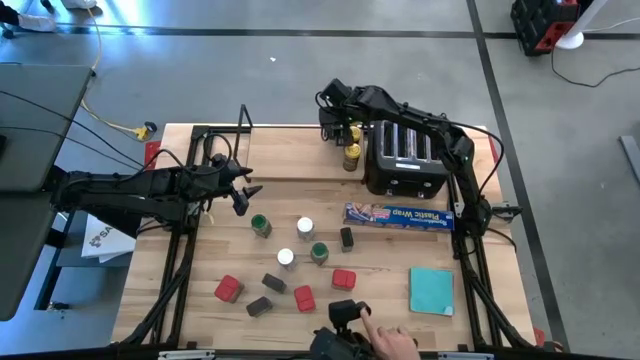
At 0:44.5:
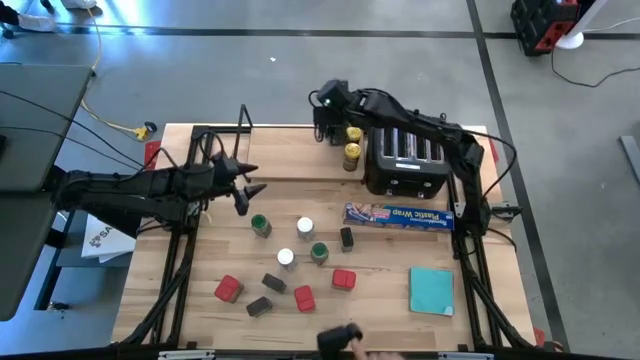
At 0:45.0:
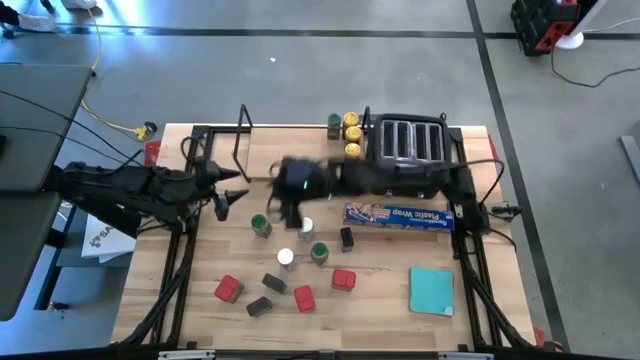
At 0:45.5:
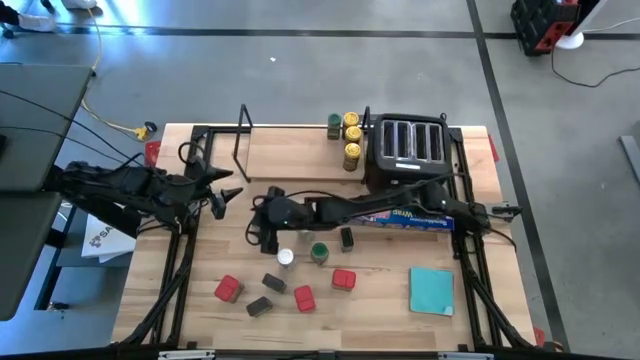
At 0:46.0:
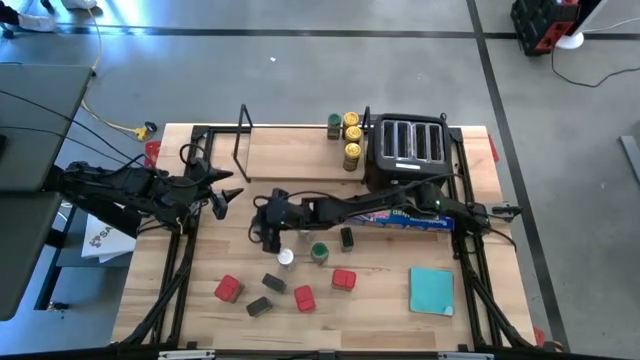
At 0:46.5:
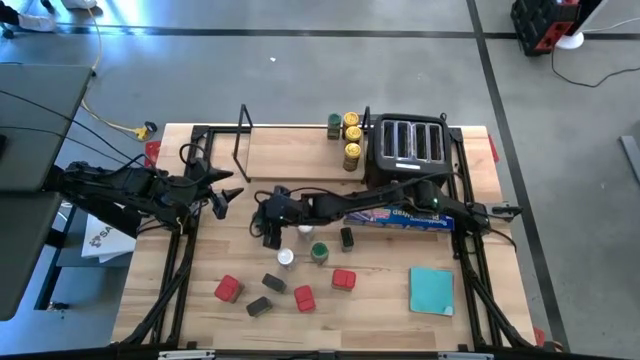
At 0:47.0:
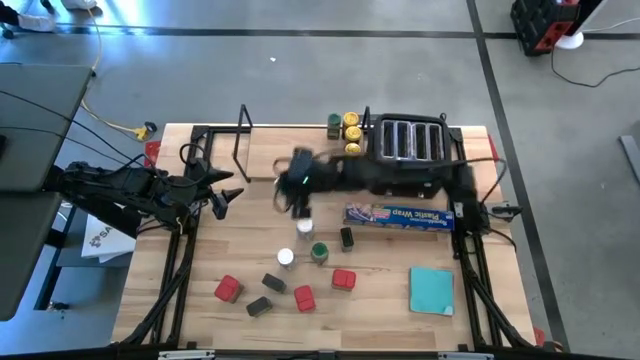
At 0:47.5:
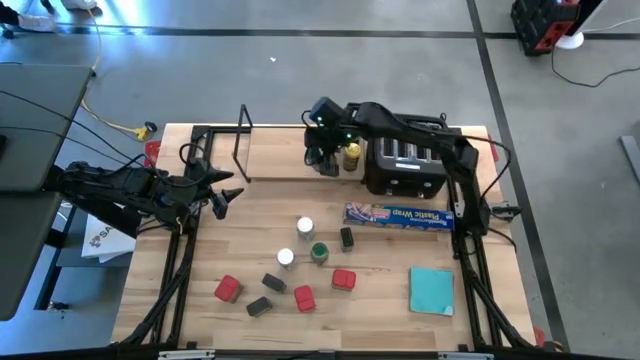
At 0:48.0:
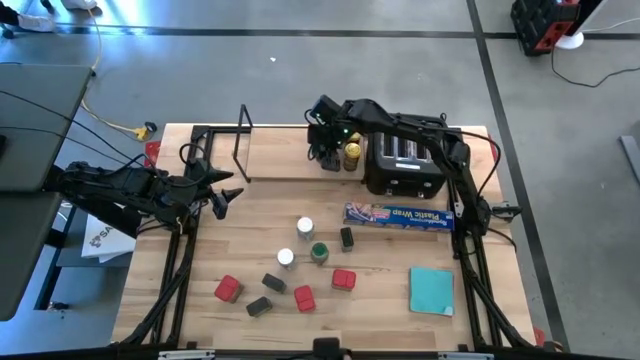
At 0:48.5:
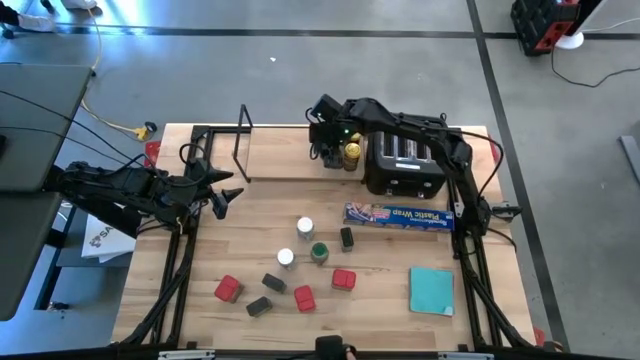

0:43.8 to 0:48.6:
Task: Shelf spices
Put the left green seasoning bottle on the shelf aligned with the other green seasoning bottle

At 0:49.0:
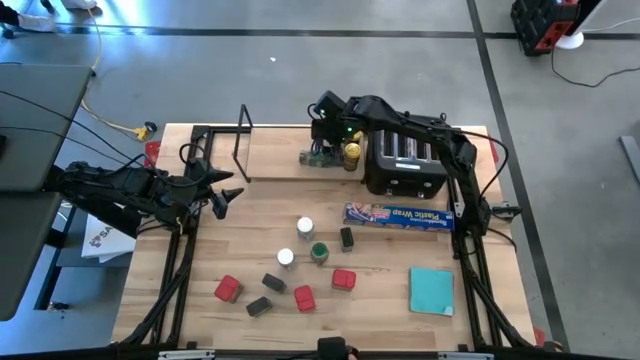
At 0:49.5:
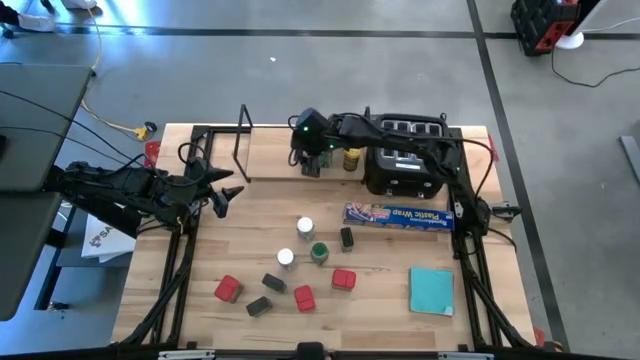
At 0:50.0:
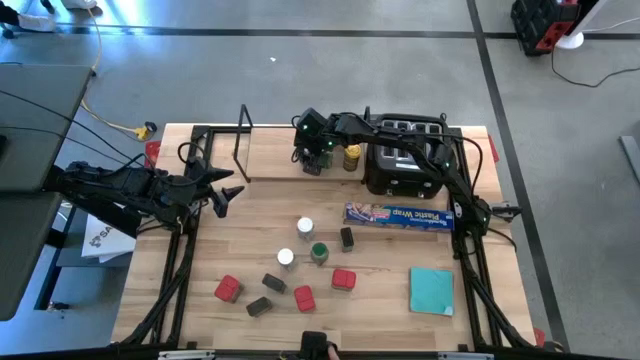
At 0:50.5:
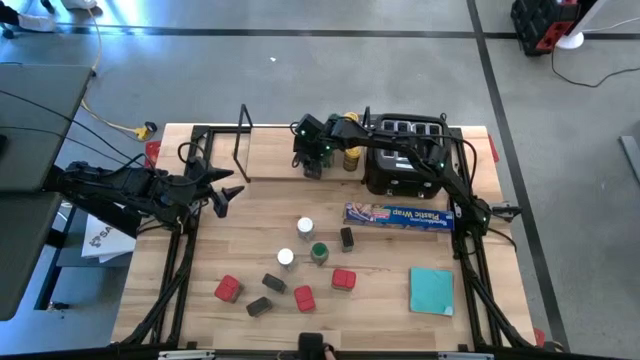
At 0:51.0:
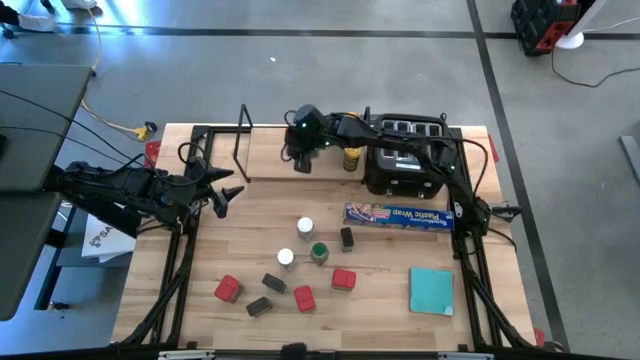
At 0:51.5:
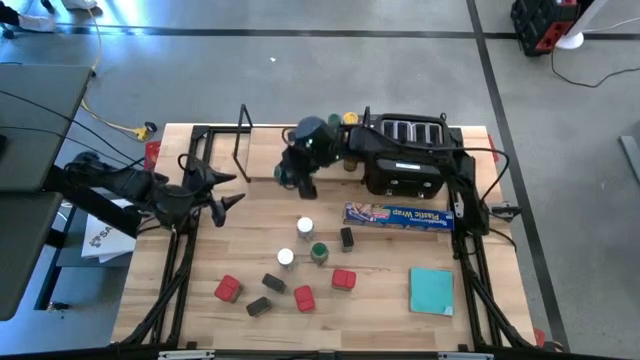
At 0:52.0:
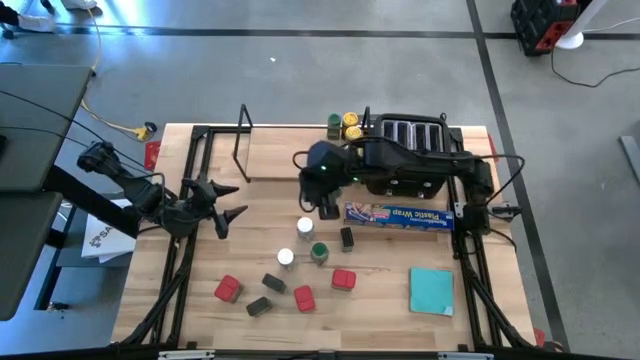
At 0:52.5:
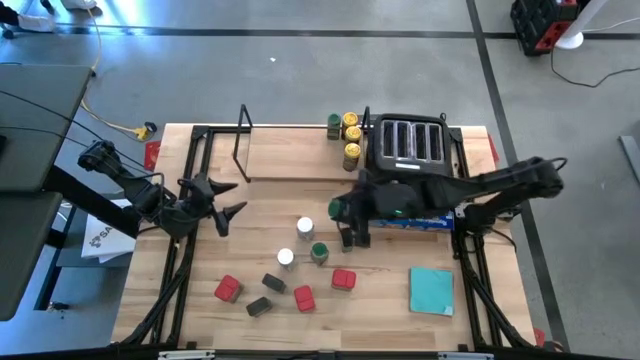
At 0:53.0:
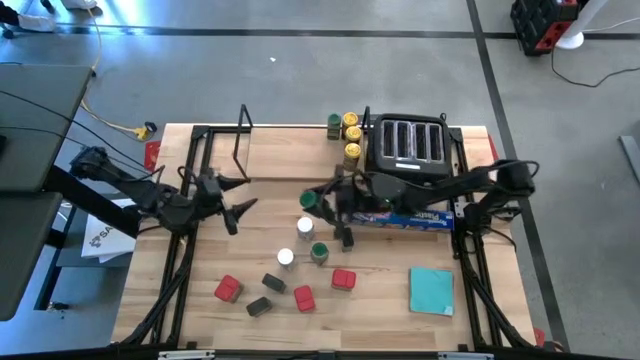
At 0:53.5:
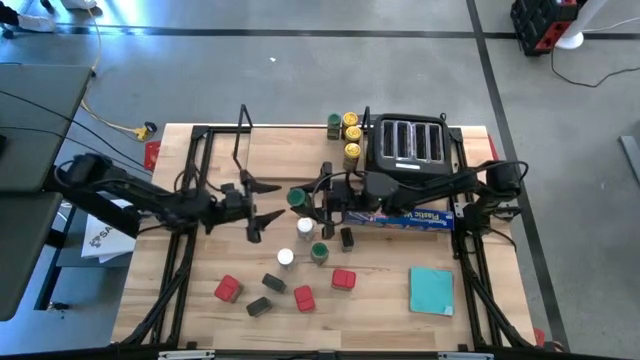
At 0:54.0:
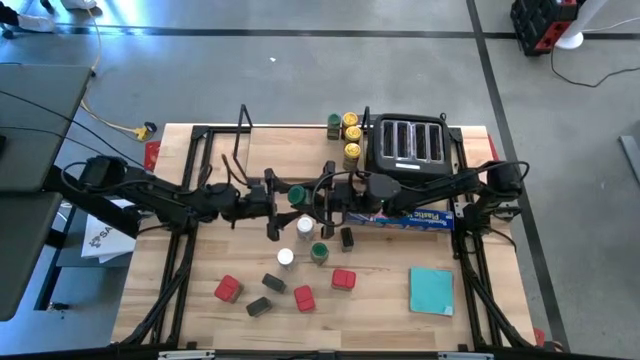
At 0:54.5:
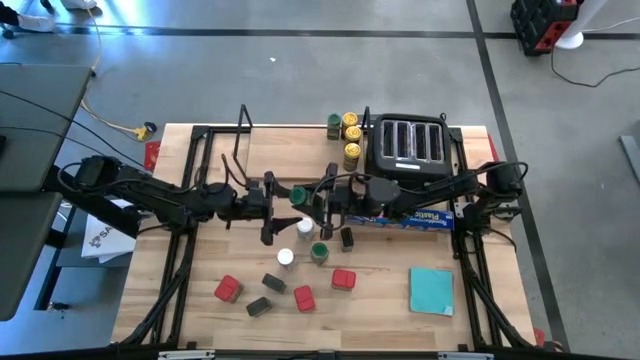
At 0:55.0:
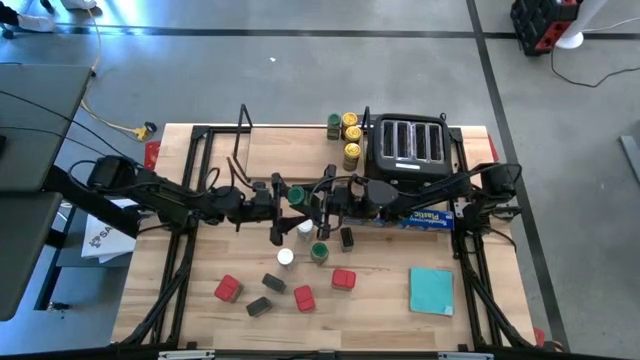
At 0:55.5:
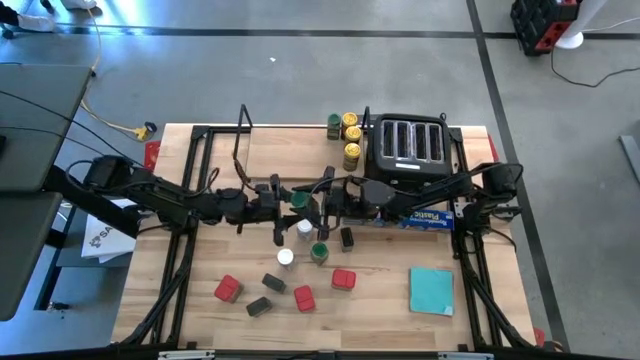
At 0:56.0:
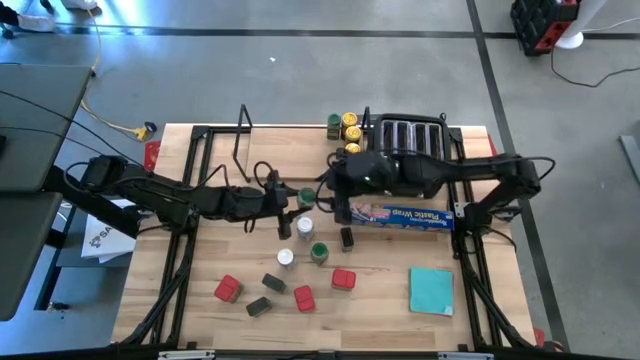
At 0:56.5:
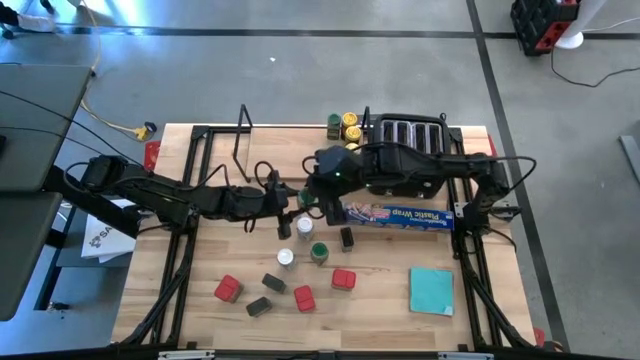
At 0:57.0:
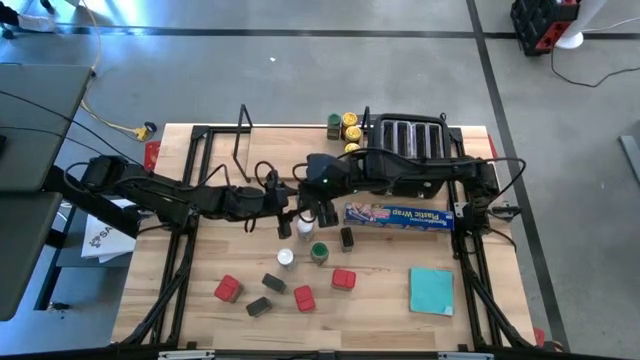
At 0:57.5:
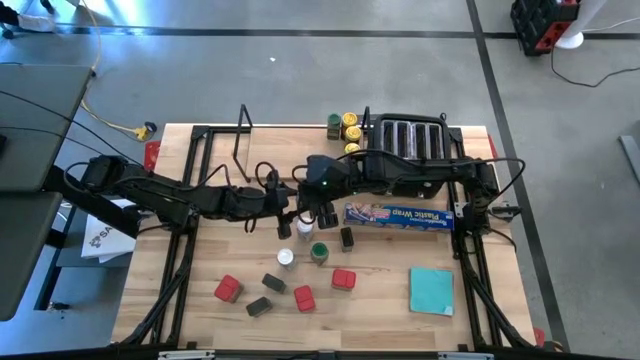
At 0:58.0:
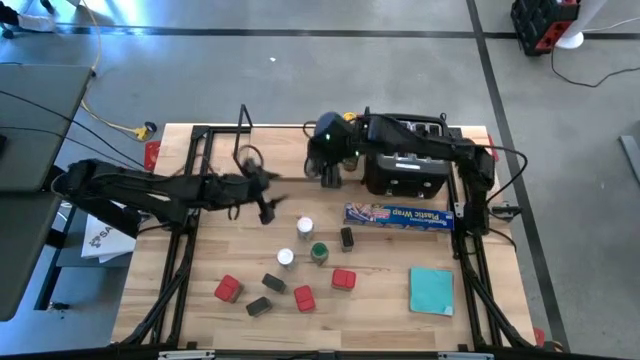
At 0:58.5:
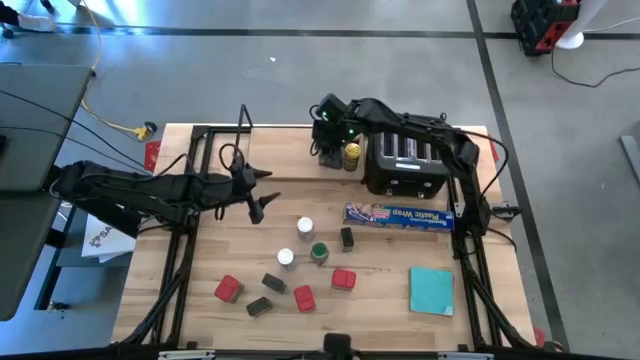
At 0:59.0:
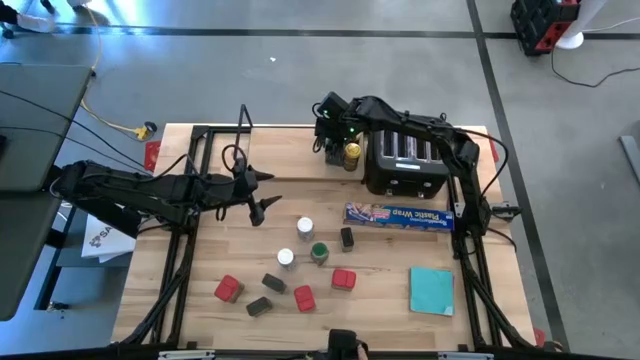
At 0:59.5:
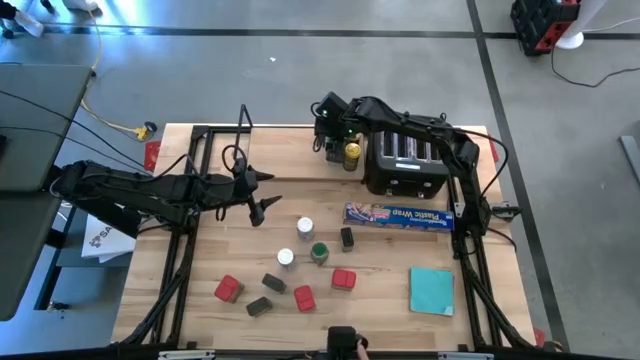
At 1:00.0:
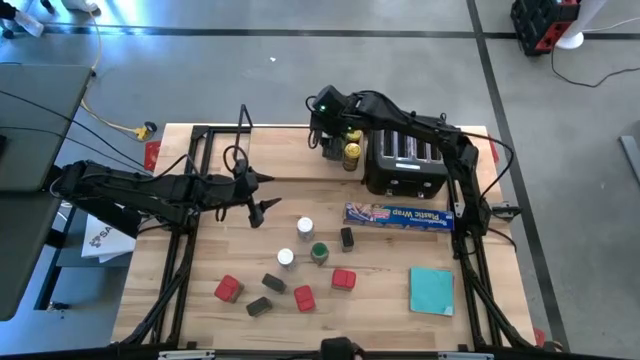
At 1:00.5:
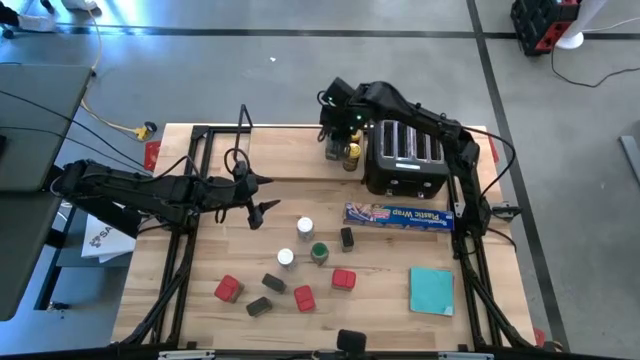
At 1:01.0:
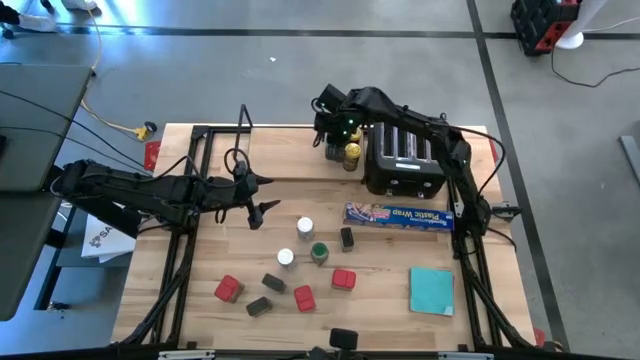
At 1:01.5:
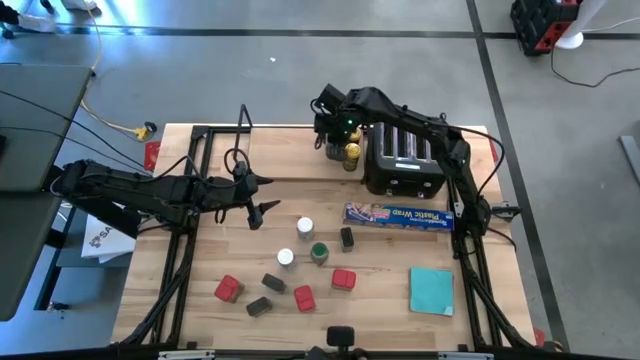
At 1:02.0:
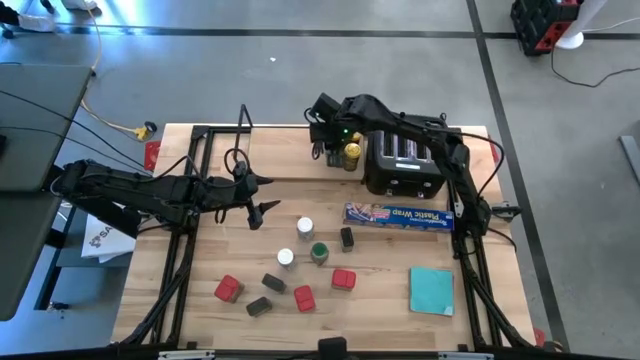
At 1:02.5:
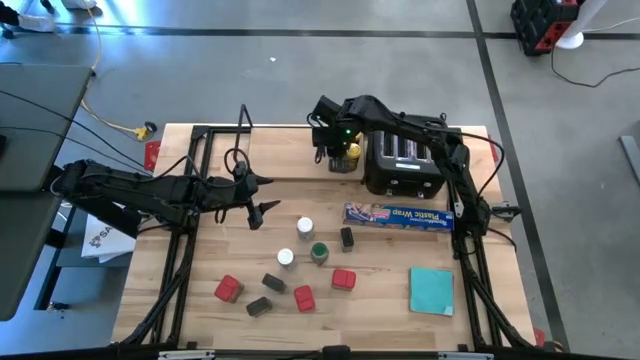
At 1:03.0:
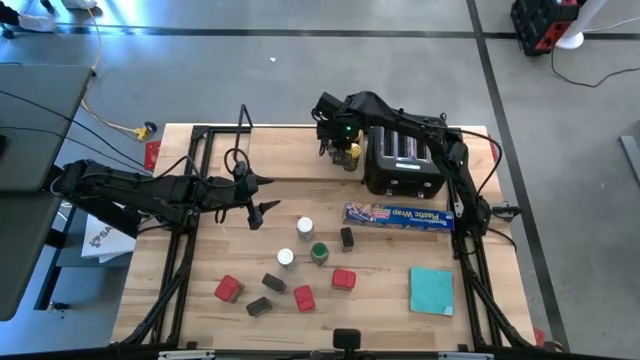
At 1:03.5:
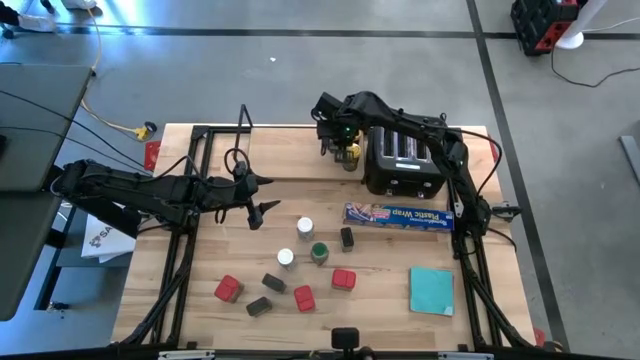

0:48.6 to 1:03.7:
Adjust the green seasoning bottle on the shelf
